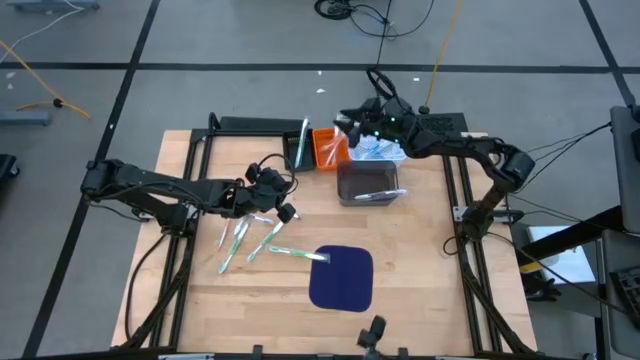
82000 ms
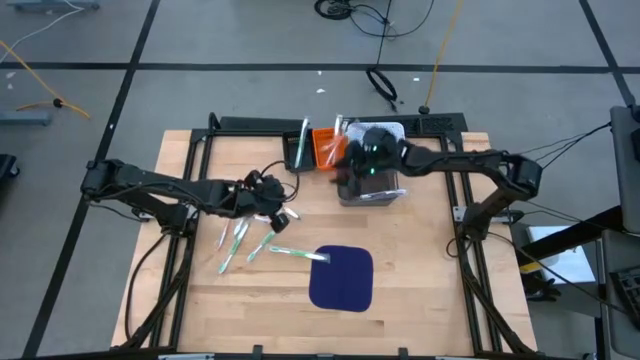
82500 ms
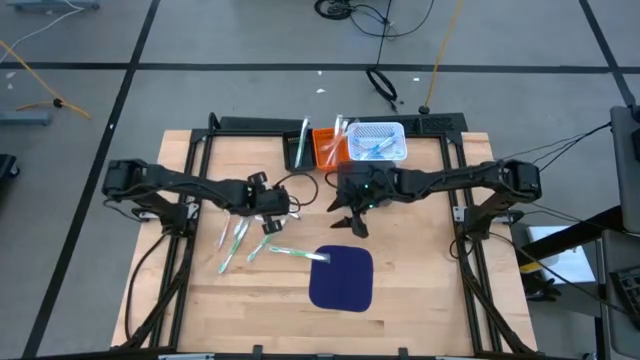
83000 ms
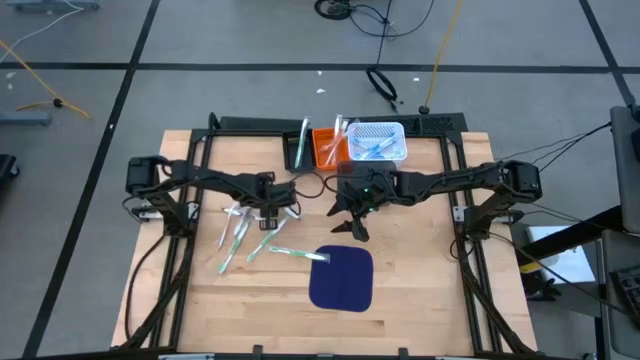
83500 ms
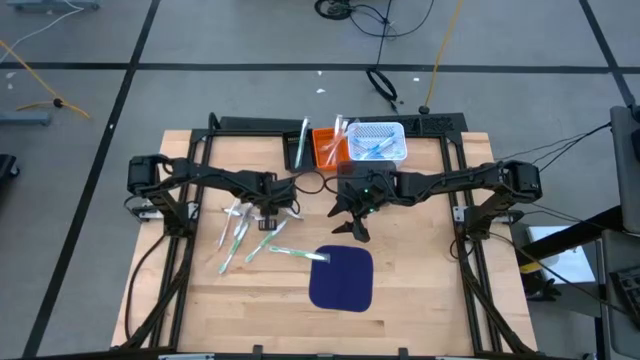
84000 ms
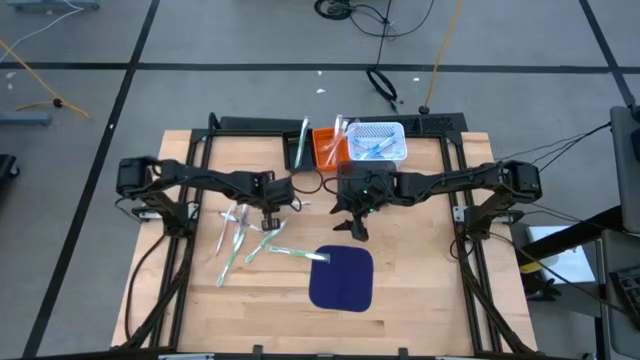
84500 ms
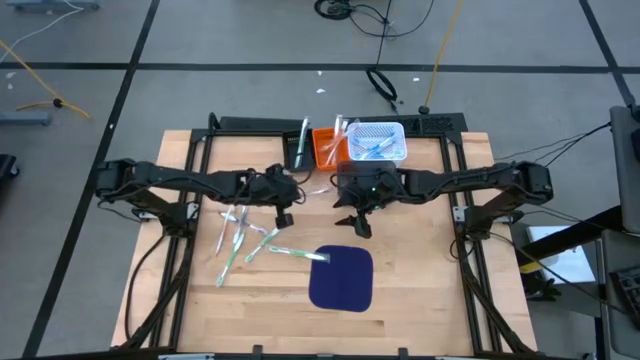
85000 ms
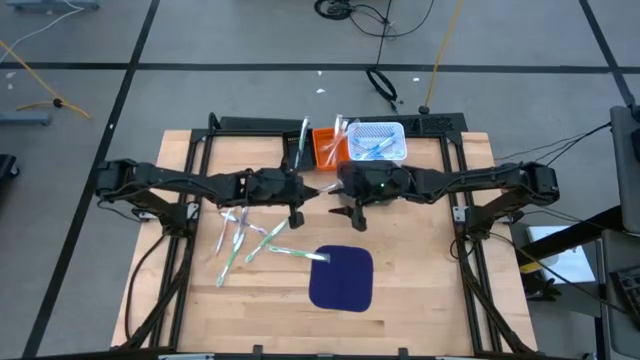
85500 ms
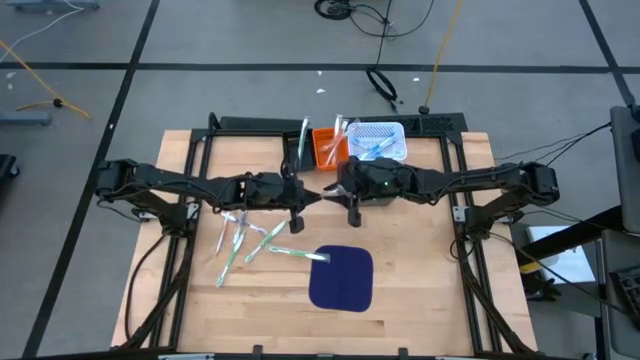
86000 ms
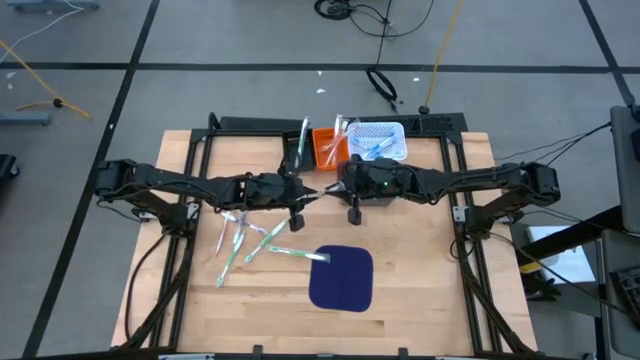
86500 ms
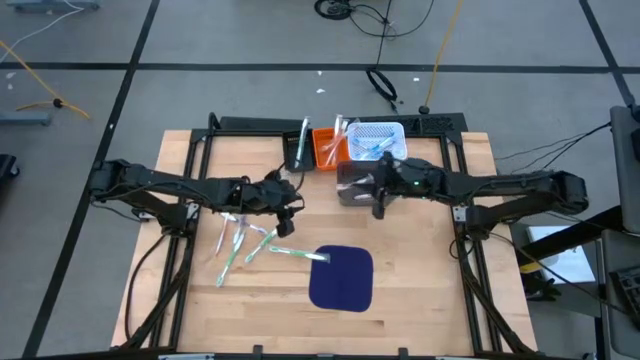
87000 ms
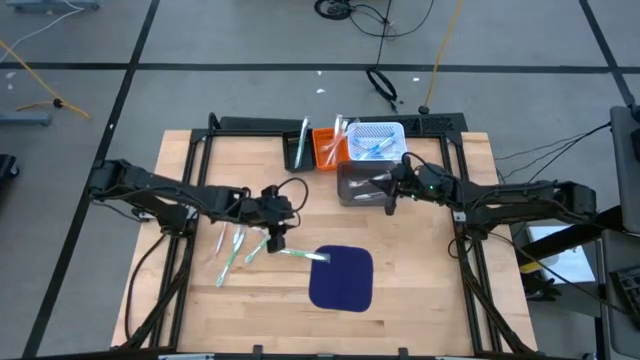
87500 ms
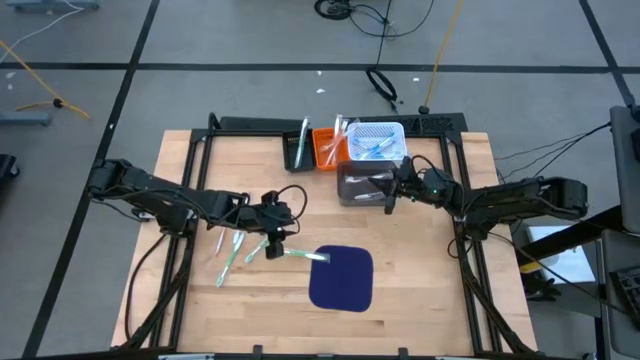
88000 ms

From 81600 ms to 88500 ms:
Task: Pick & Place Toothbrushes
Put the violet toothbrush into the gray basket

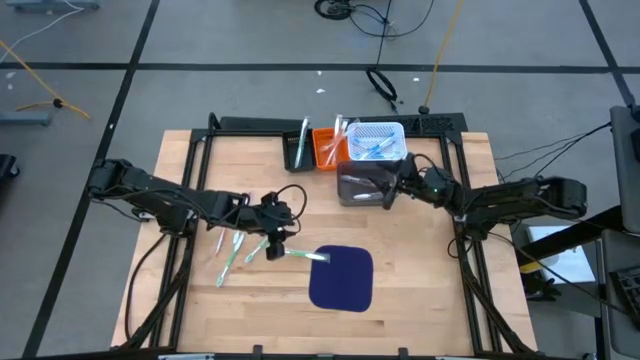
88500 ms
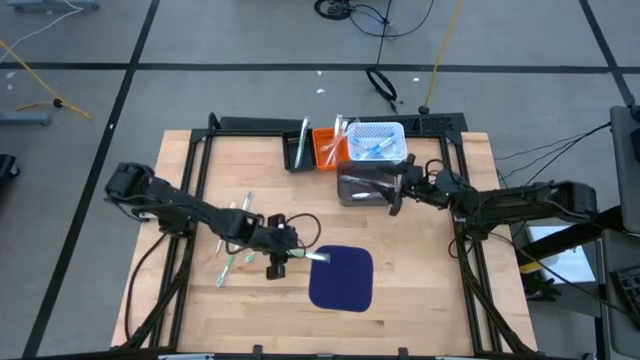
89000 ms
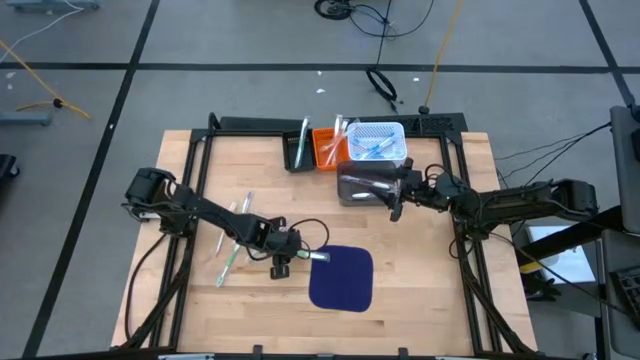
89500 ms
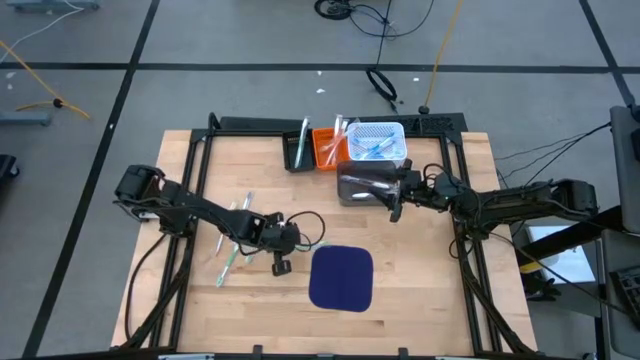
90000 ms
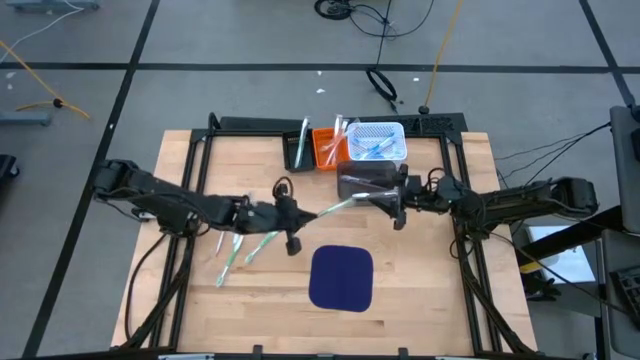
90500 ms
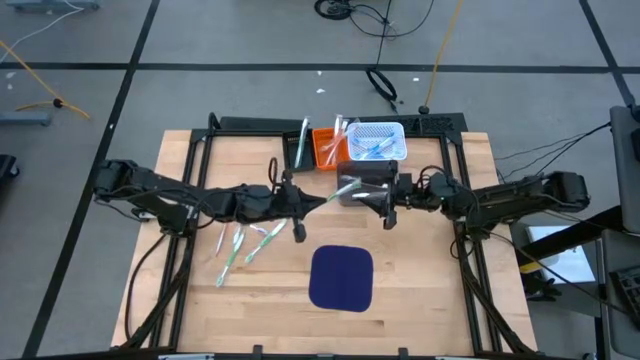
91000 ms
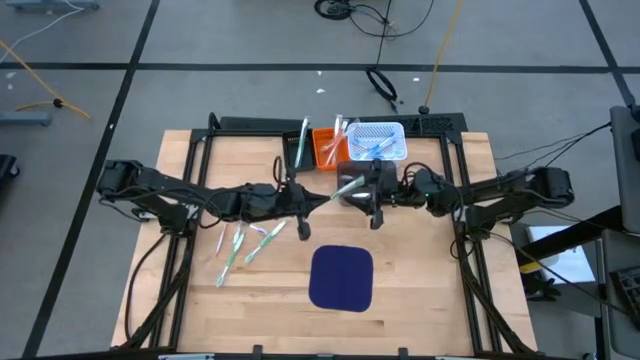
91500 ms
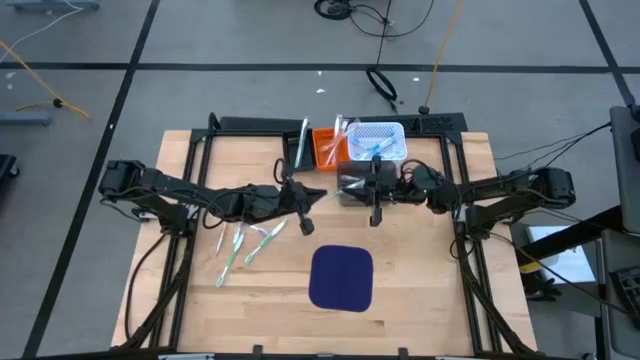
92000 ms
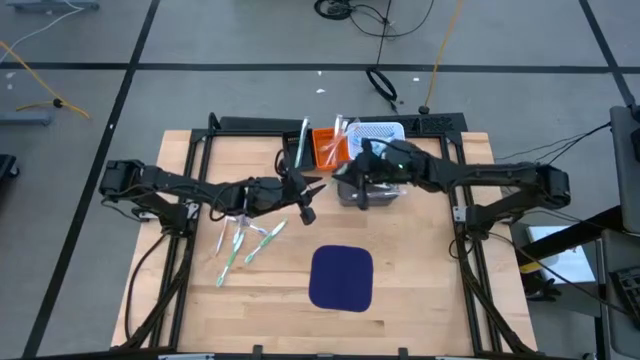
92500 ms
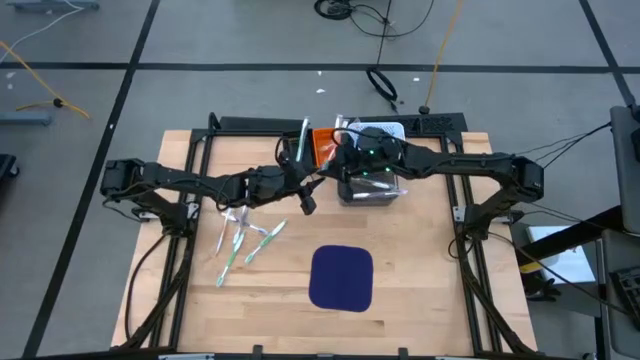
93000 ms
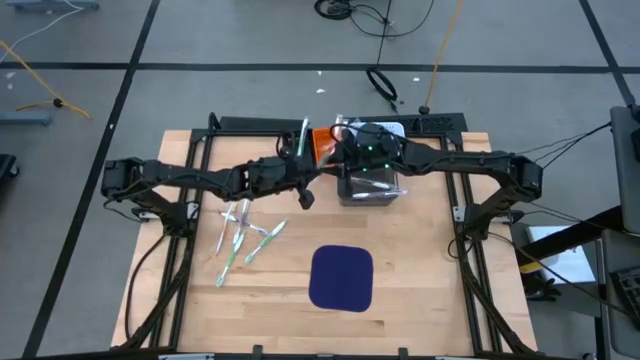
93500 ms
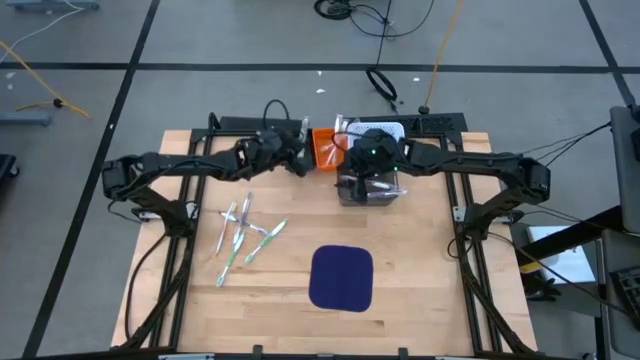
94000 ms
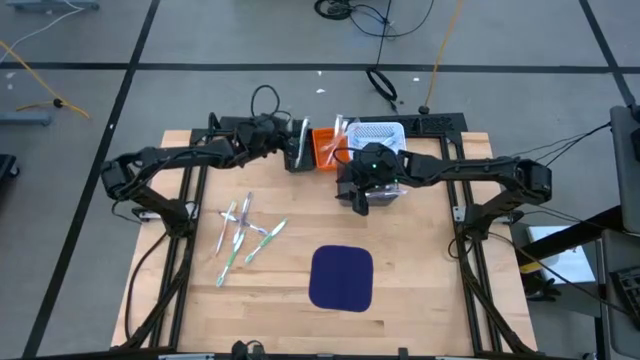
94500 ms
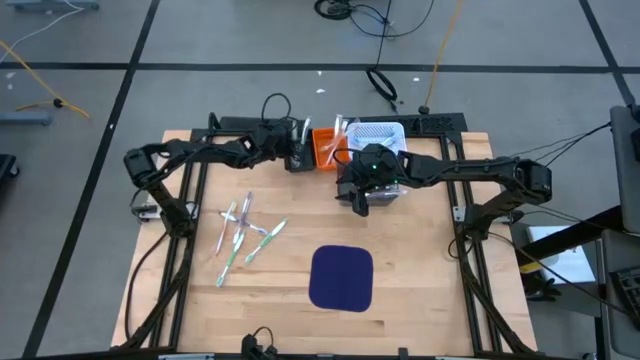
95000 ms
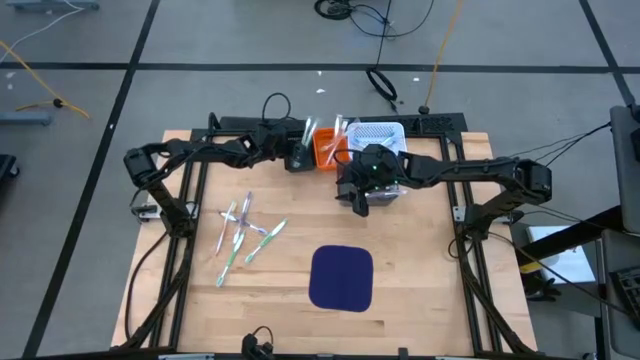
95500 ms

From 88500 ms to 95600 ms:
Put the green toothbrush into the black basket

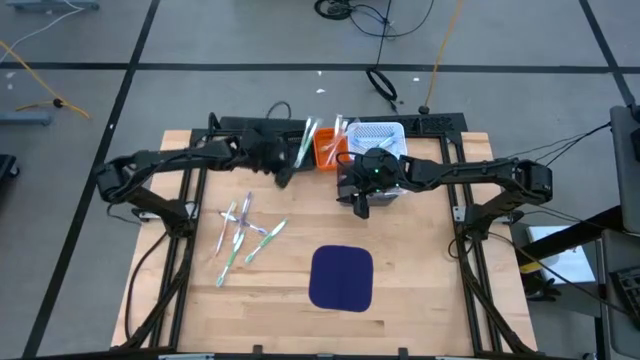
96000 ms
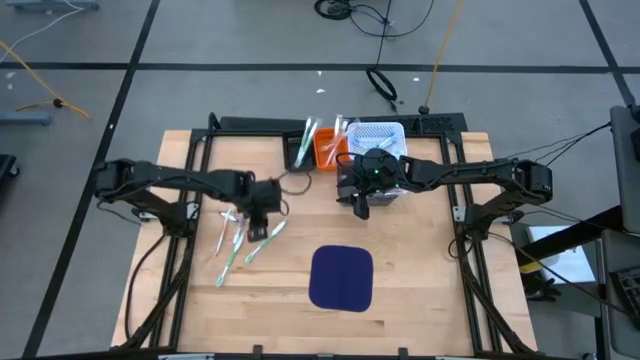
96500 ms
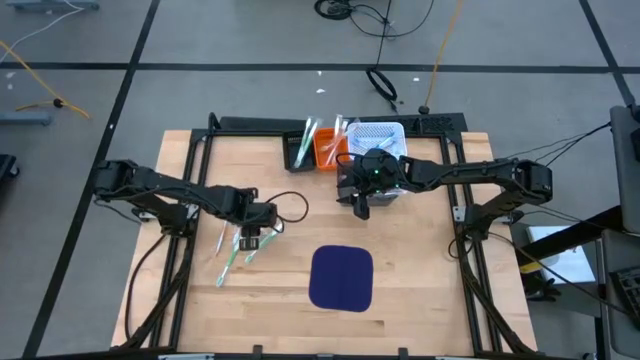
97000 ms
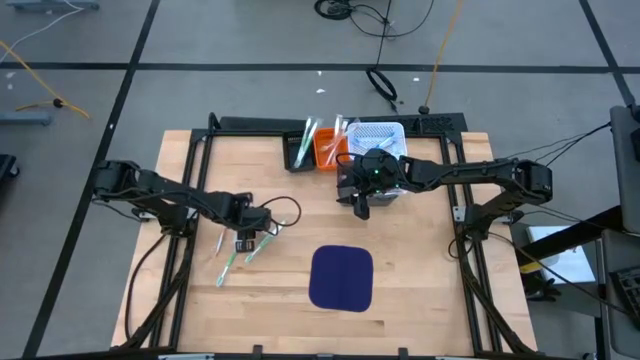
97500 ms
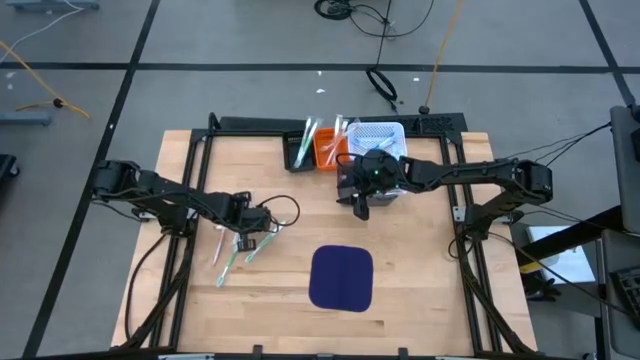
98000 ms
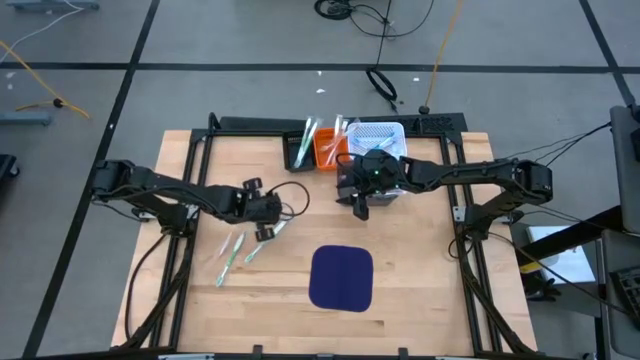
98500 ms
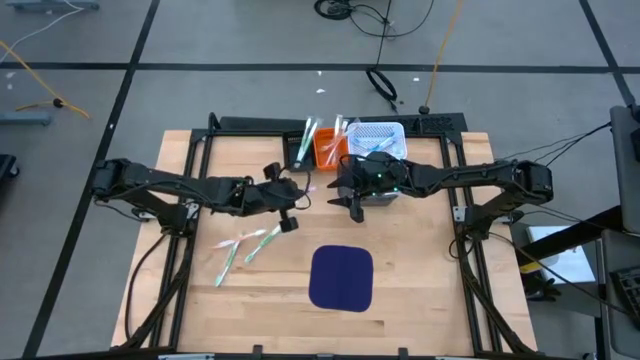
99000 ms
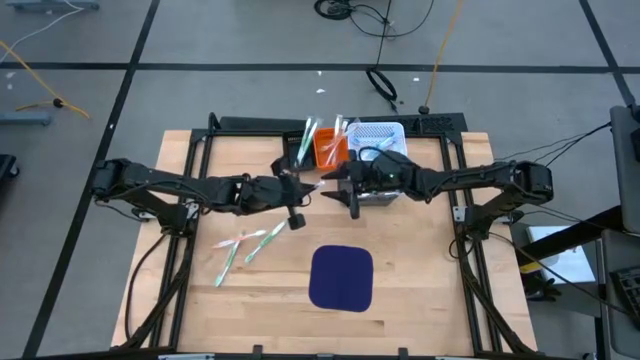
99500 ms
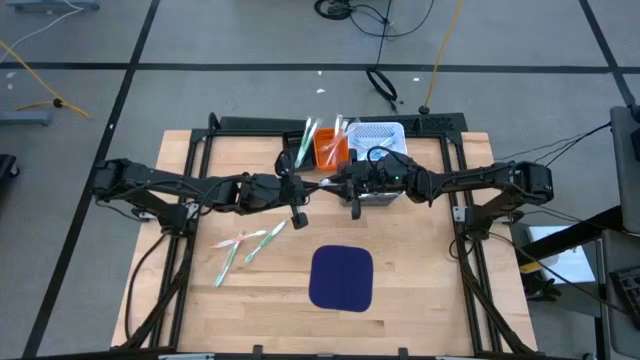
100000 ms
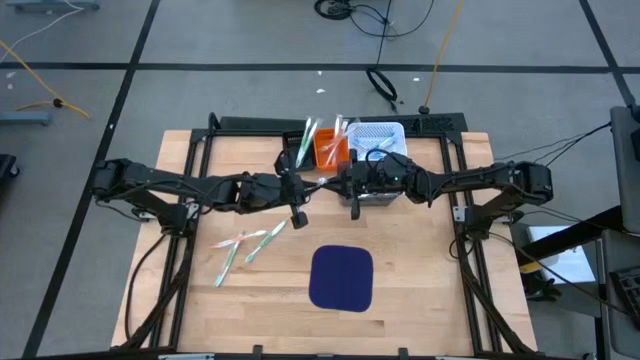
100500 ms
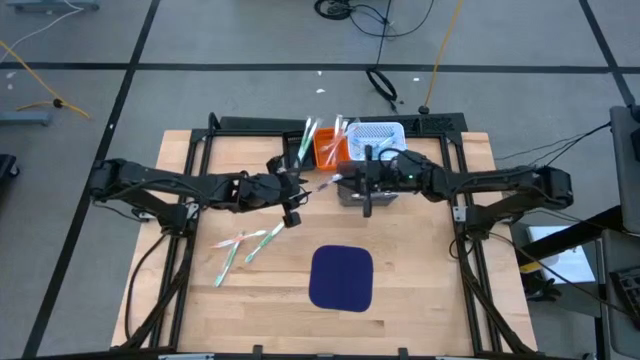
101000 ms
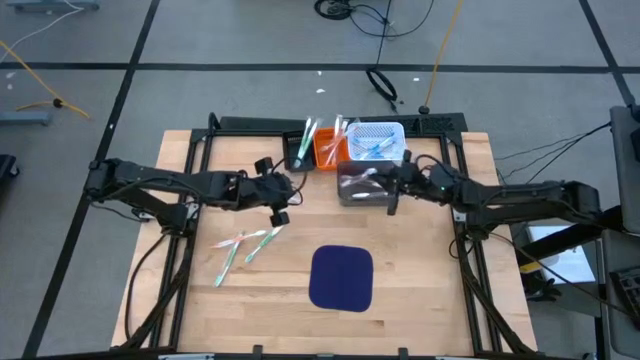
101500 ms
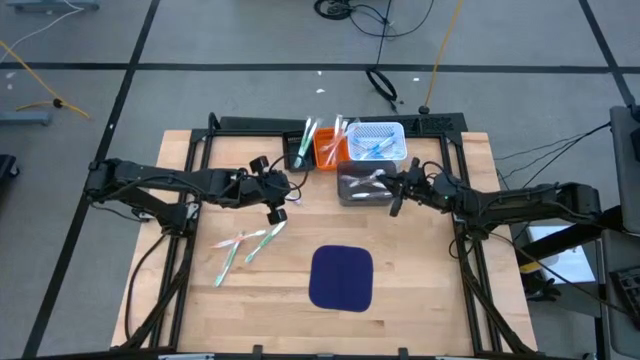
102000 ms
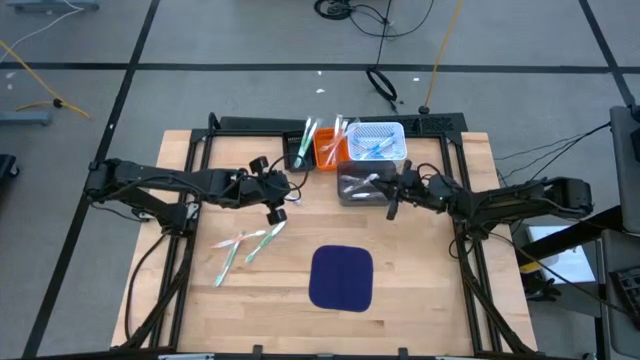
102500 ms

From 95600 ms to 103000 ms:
Put the violet toothbrush into the gray basket
